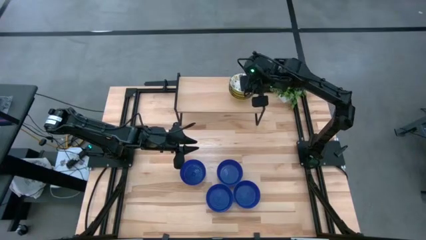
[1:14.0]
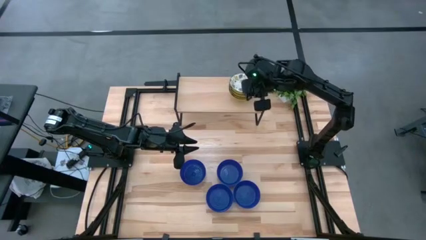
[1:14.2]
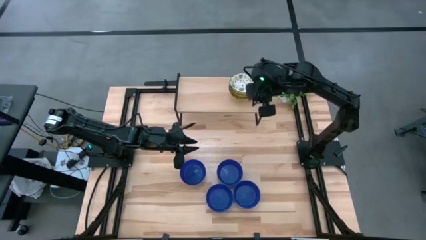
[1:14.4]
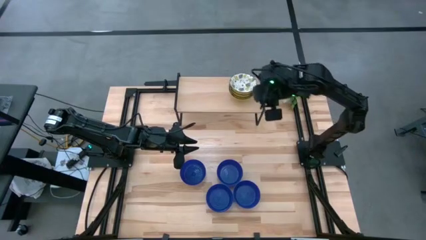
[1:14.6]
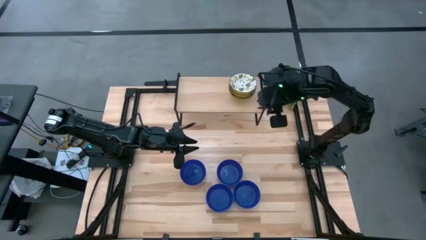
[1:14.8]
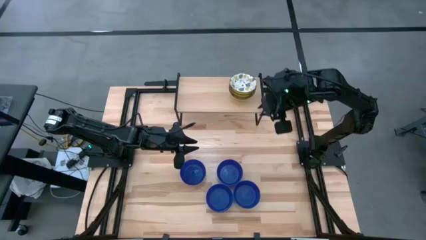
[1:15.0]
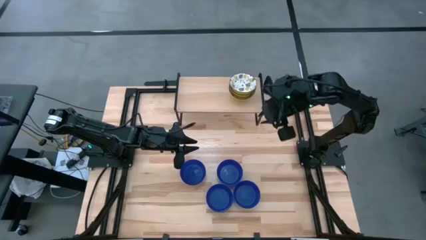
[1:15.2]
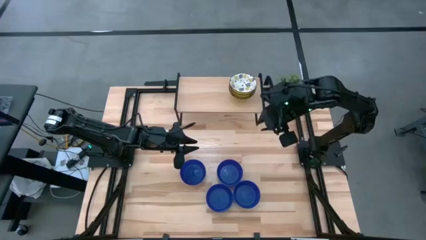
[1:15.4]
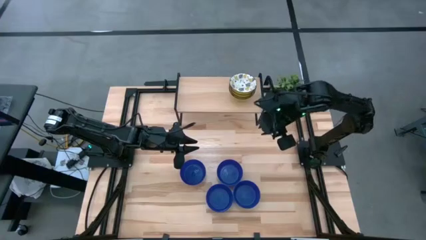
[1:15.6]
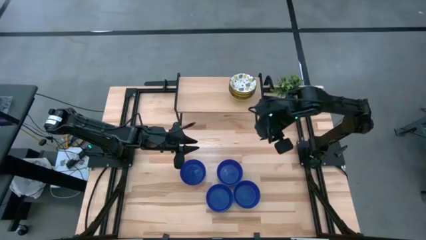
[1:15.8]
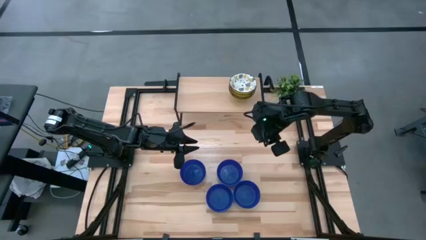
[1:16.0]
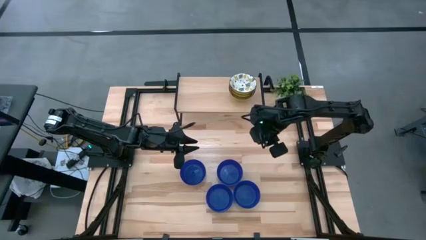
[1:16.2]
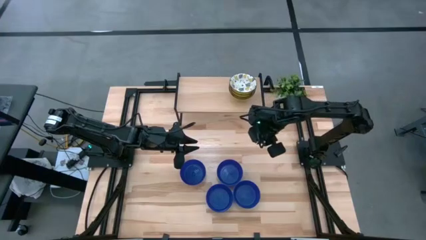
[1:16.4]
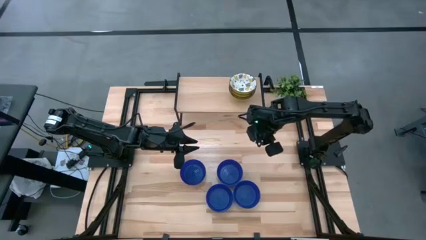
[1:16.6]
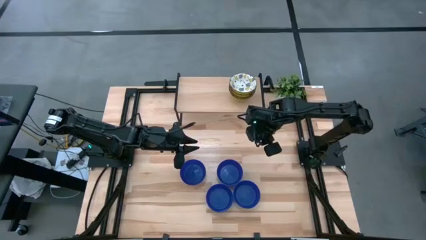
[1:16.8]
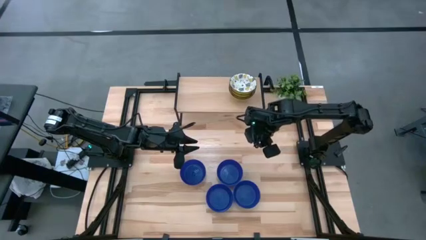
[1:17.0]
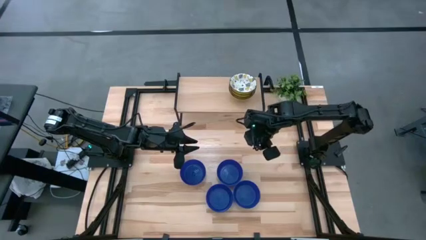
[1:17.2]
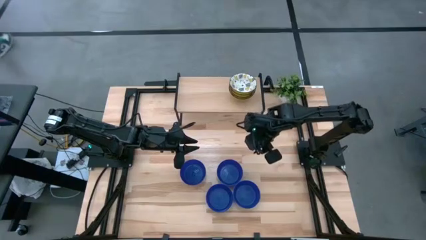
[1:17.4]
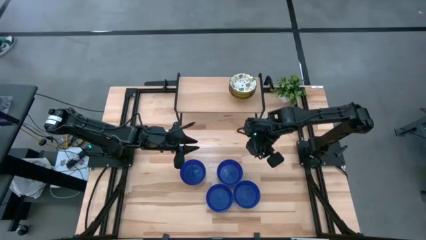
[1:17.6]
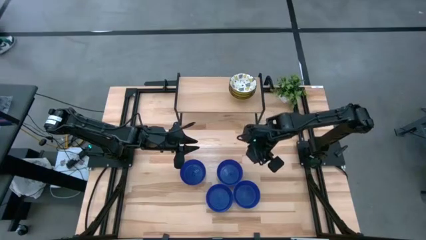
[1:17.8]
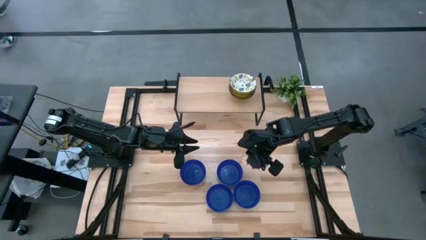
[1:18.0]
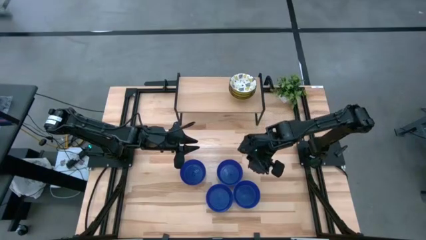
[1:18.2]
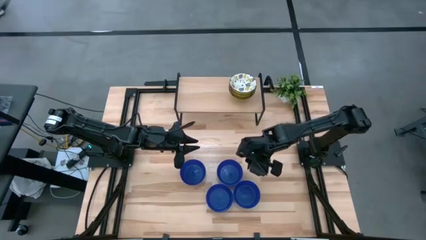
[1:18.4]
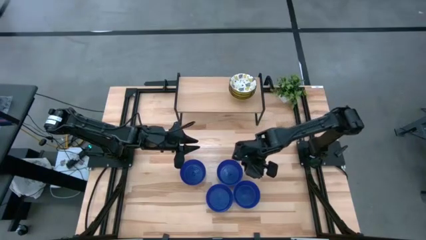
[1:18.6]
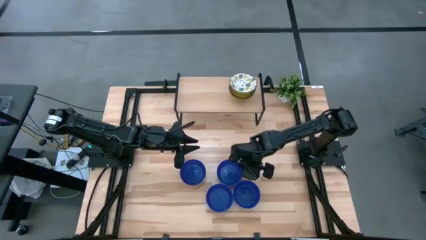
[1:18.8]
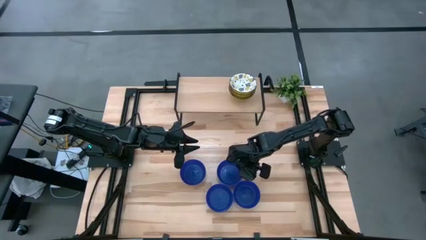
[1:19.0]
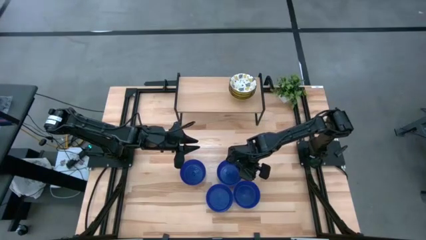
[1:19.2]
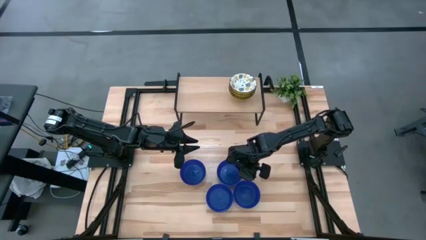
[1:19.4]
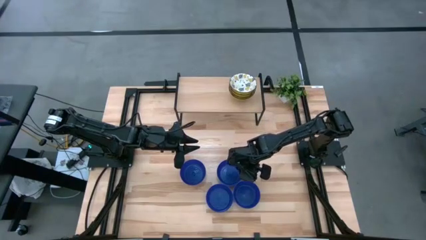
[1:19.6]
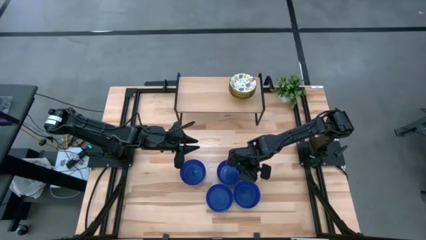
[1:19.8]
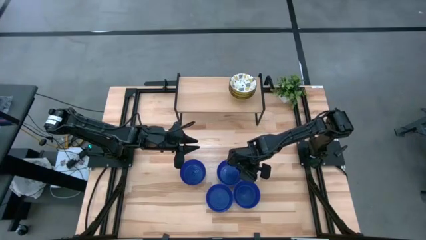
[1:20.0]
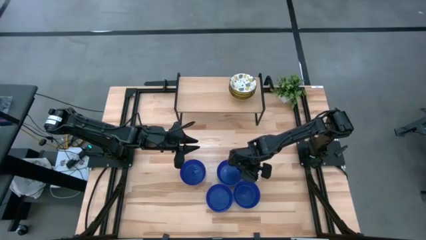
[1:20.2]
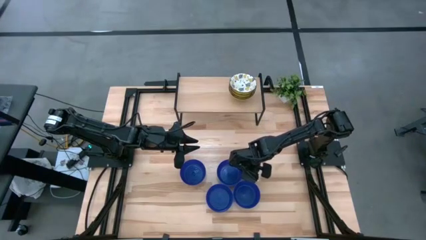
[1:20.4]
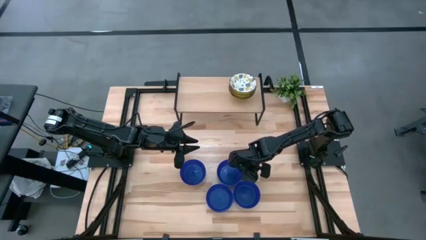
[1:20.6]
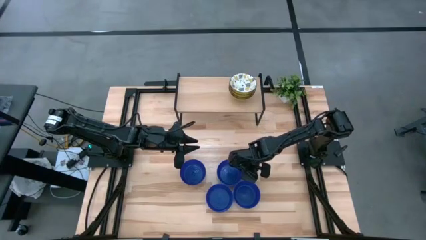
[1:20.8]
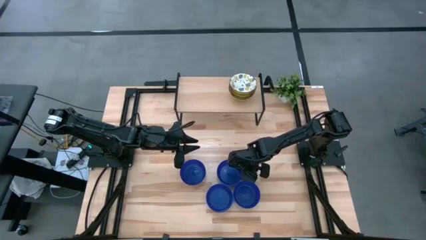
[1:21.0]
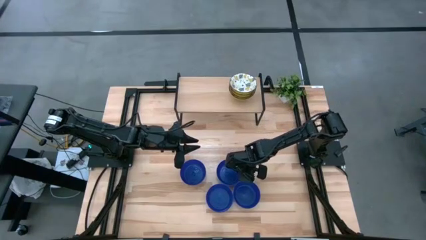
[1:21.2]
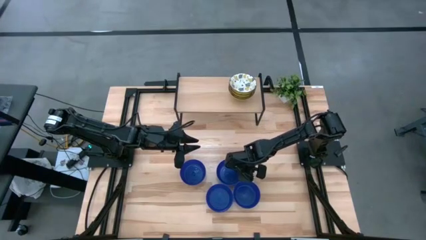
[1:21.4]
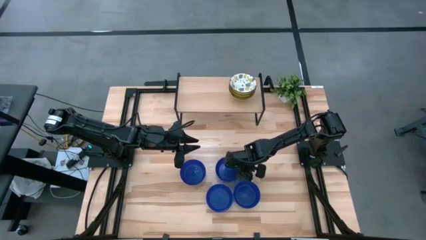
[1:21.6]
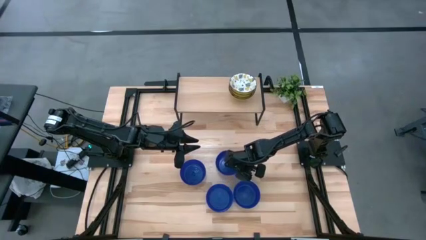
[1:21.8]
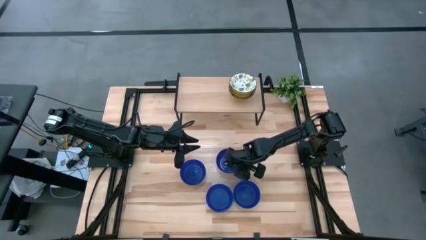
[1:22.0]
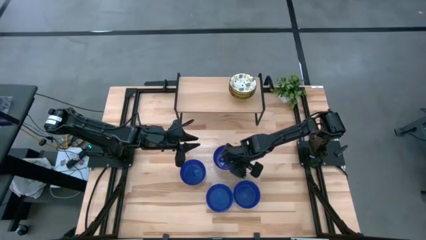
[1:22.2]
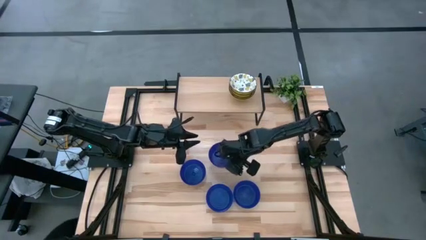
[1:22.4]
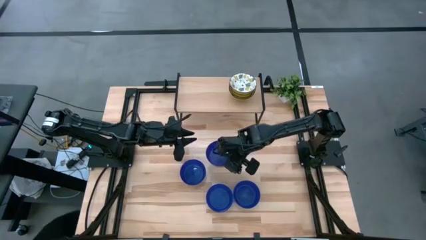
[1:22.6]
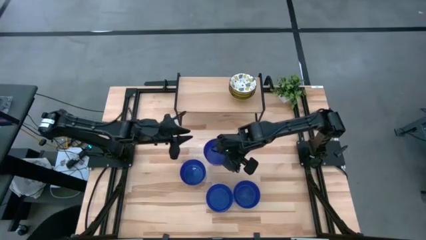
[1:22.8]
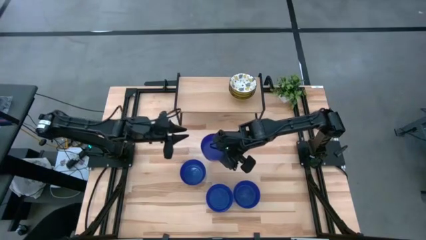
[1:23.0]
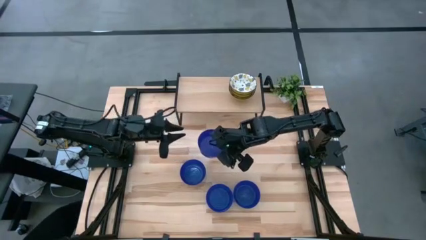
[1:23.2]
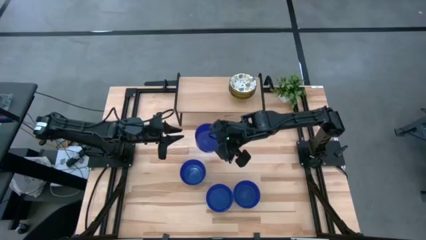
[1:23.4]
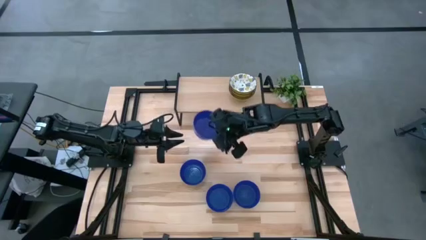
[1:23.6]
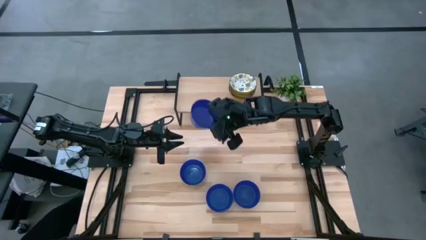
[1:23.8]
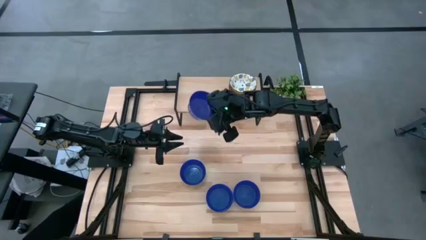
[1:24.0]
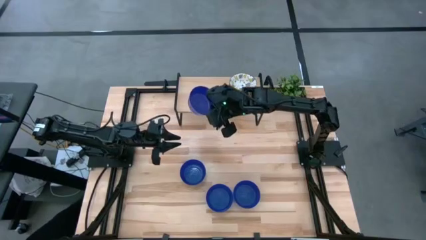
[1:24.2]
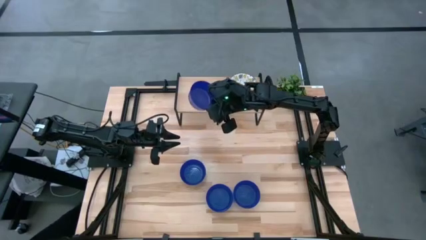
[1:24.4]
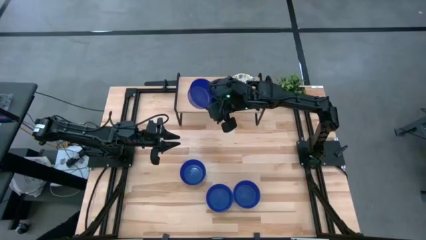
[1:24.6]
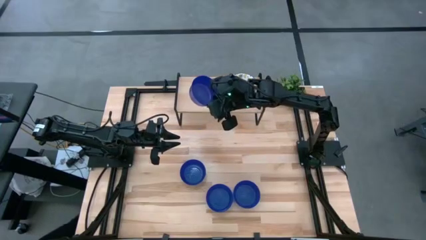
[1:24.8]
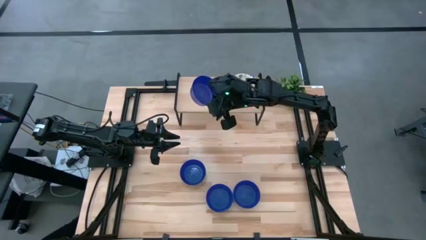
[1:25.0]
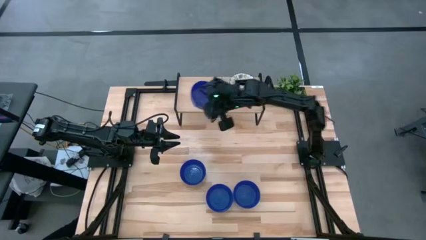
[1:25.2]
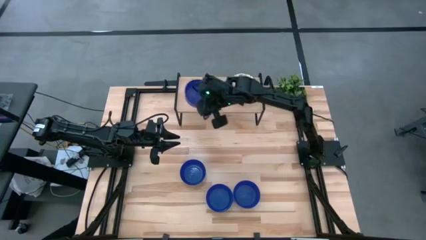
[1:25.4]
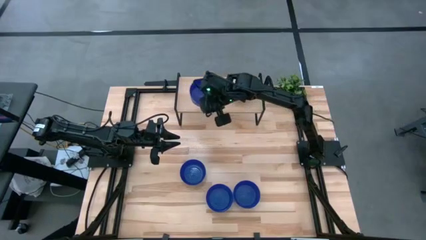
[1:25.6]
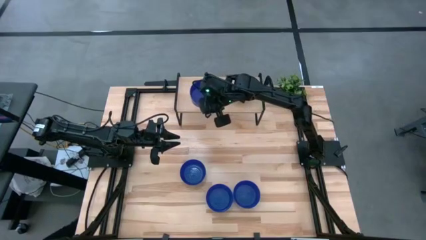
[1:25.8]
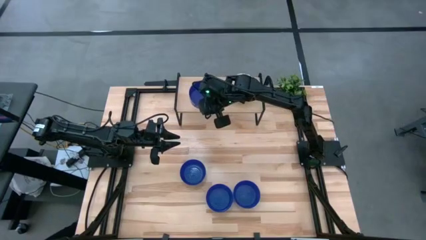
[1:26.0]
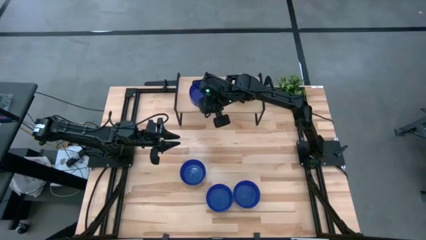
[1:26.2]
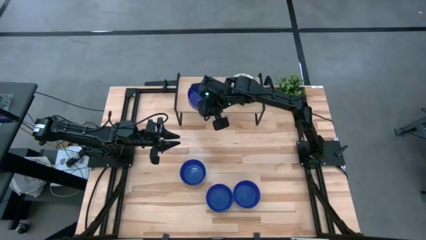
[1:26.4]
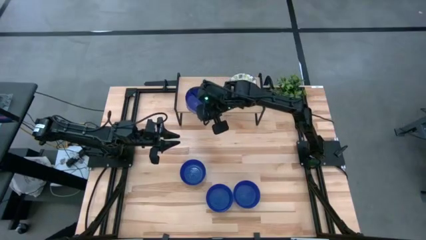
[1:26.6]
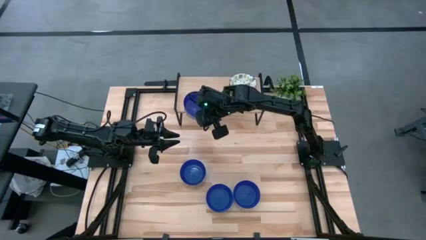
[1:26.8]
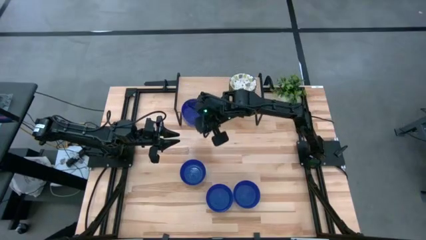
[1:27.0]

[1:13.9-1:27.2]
Task: Pick & Place Mini bowls
Put the blue bowl on the shelf

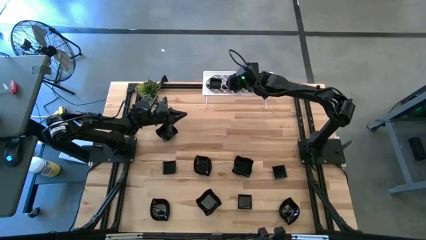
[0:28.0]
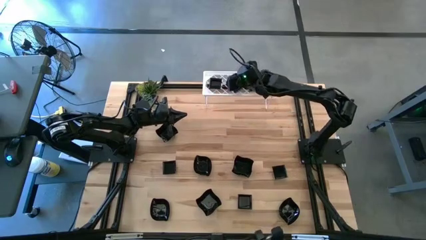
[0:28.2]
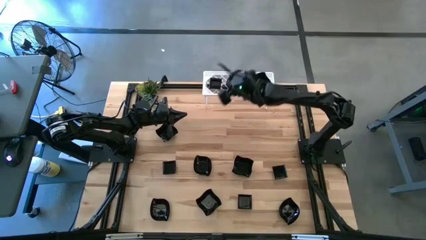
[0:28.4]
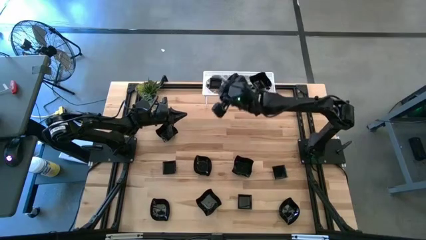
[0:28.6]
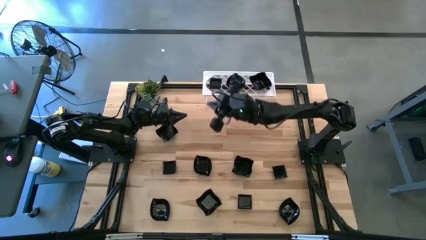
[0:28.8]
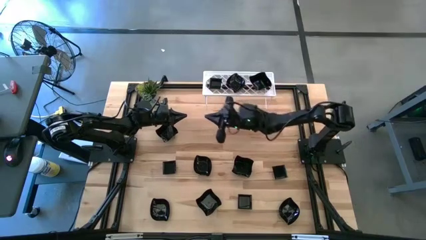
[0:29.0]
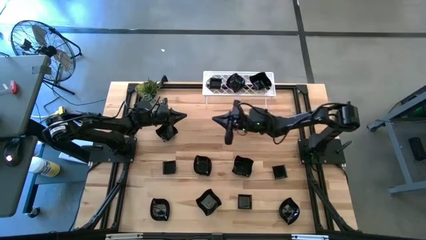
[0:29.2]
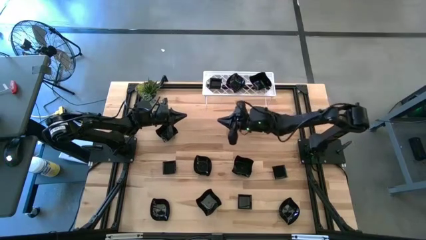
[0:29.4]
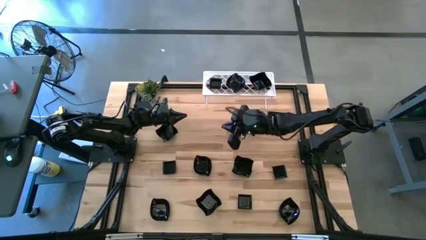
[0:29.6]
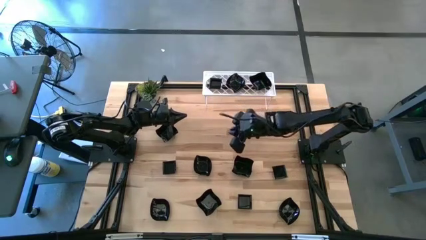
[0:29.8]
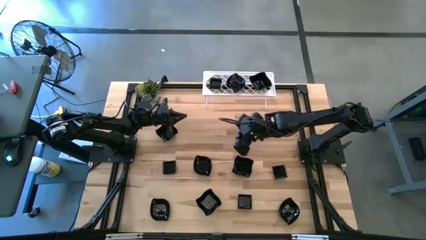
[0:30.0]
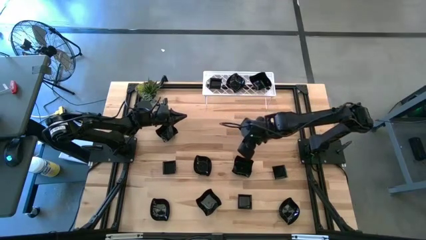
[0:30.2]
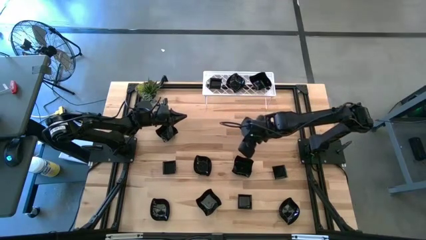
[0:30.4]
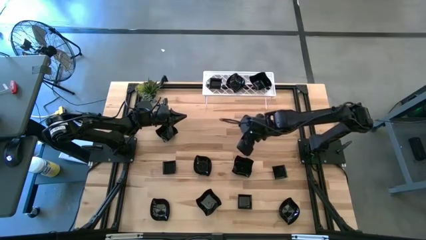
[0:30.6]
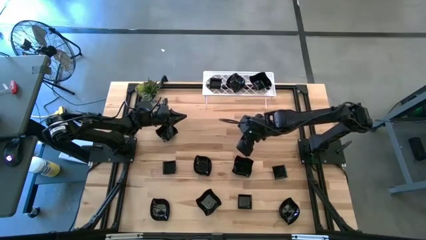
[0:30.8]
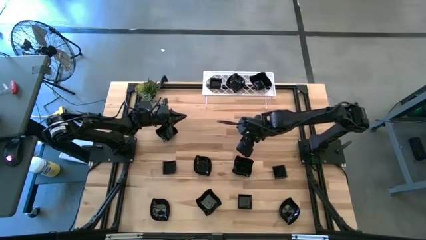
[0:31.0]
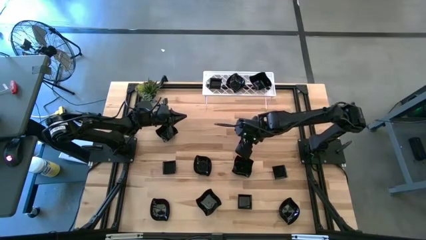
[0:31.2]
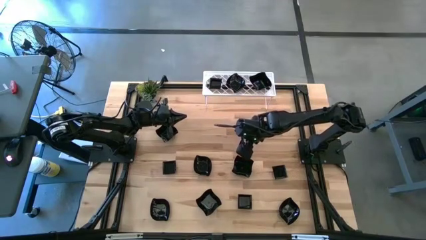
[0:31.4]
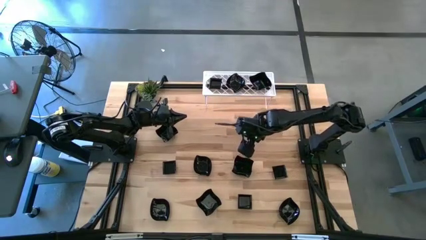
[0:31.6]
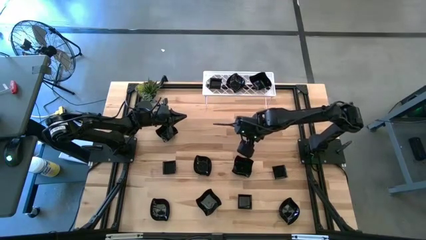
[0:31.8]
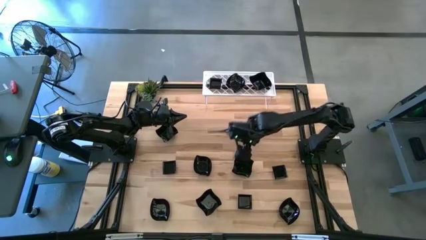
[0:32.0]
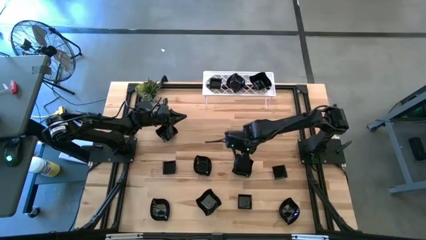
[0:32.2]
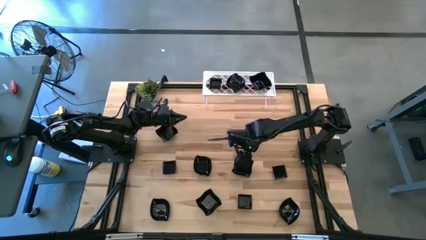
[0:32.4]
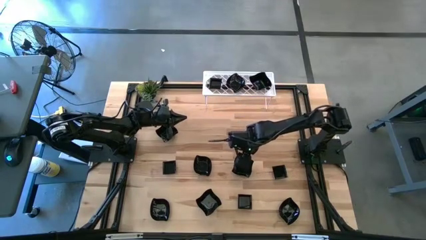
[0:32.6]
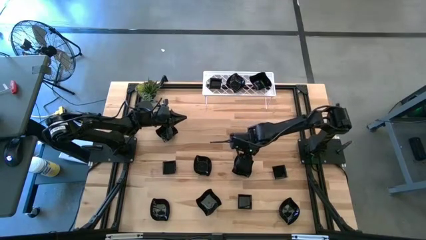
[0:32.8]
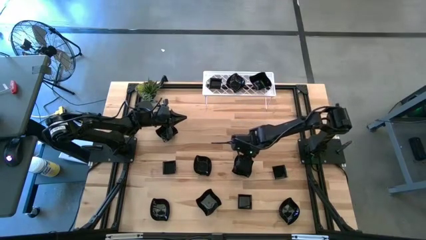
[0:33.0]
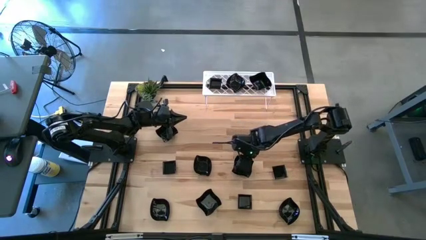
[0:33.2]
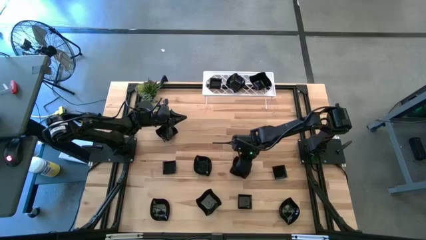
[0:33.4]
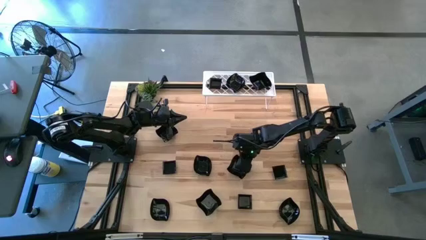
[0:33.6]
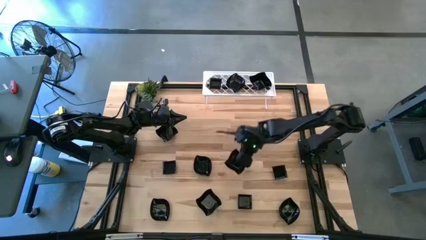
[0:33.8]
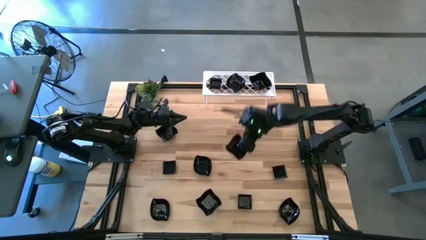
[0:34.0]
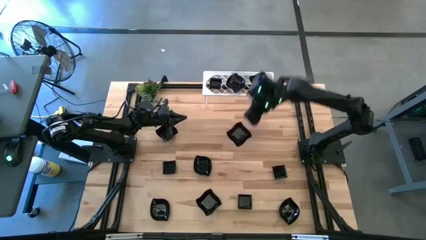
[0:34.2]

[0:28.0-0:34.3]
Task: Pick & Place Mini shaped plates
Stack the distorted square plate on top of the distorted square plate on the shelf
